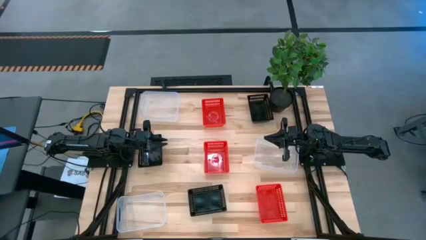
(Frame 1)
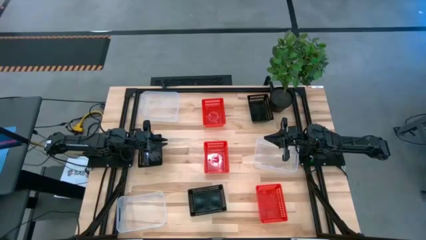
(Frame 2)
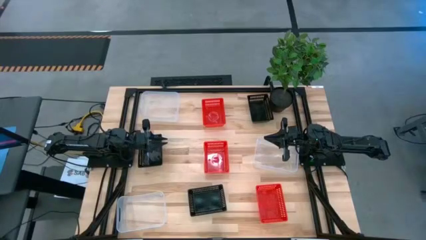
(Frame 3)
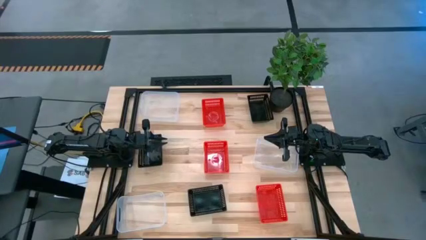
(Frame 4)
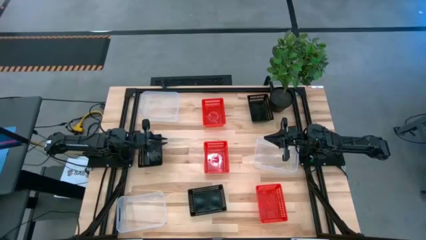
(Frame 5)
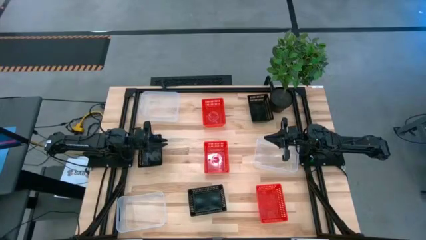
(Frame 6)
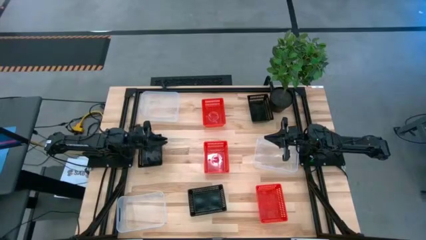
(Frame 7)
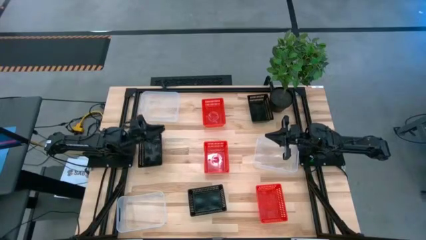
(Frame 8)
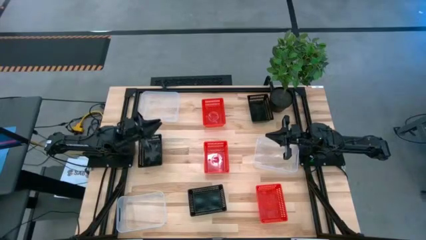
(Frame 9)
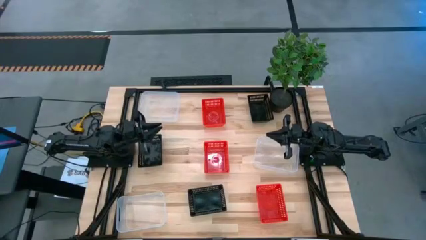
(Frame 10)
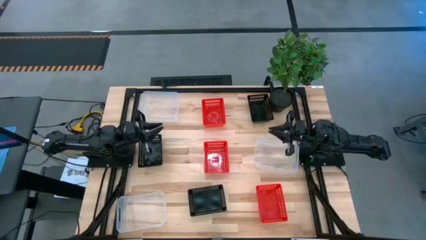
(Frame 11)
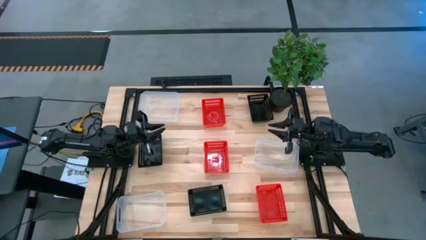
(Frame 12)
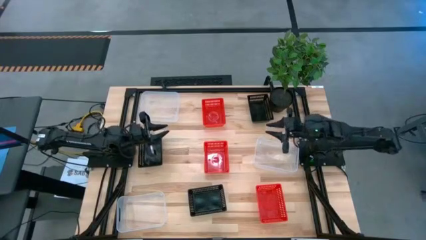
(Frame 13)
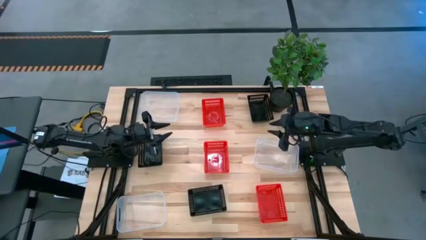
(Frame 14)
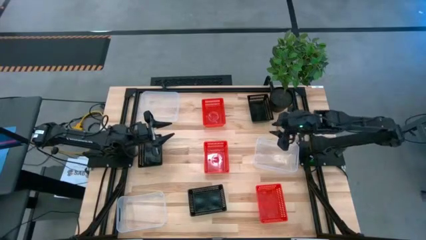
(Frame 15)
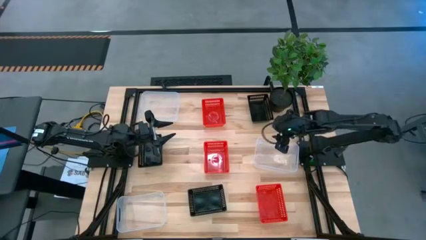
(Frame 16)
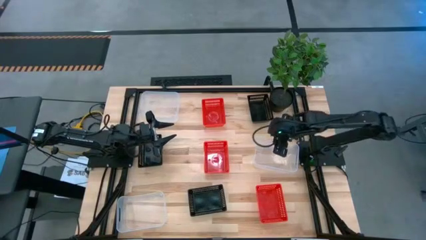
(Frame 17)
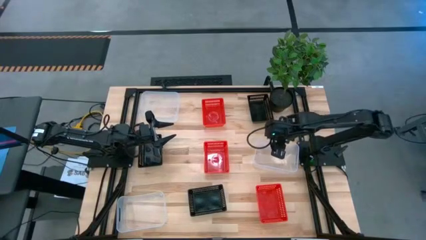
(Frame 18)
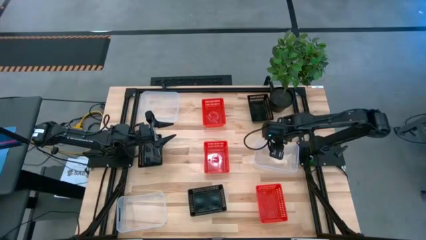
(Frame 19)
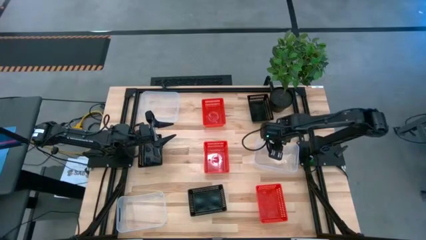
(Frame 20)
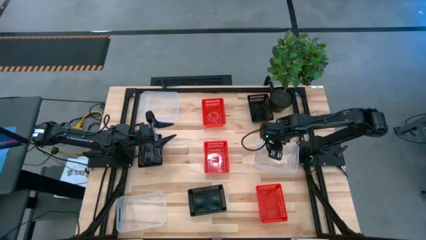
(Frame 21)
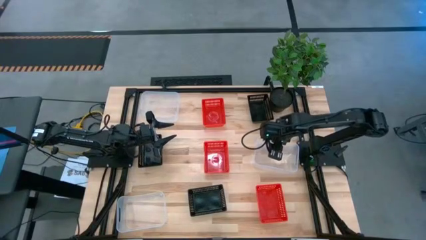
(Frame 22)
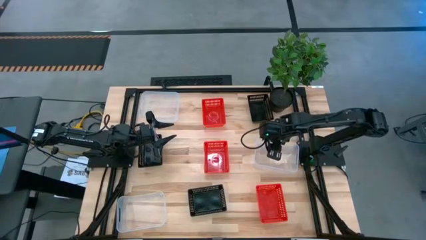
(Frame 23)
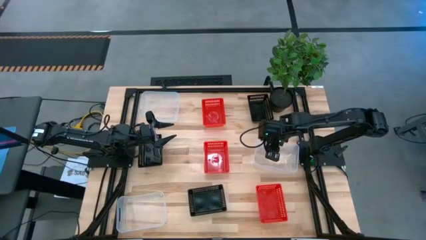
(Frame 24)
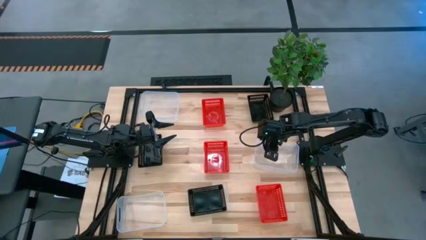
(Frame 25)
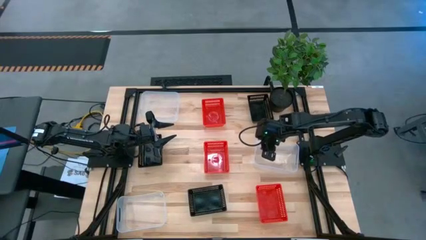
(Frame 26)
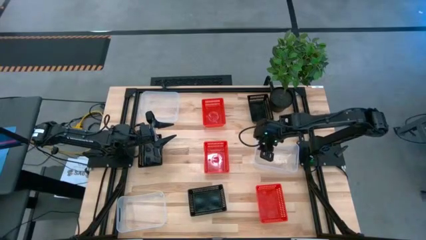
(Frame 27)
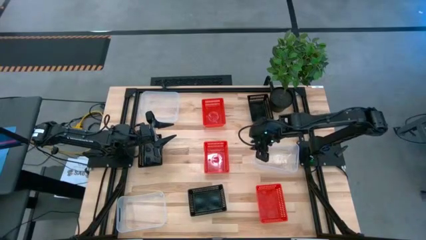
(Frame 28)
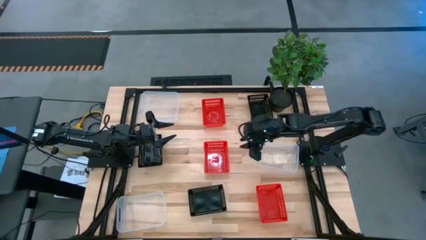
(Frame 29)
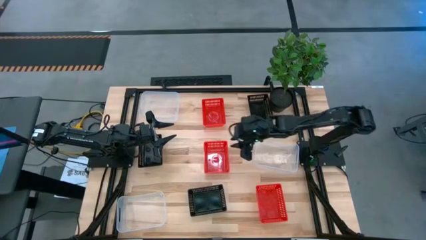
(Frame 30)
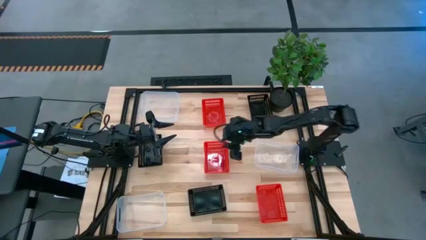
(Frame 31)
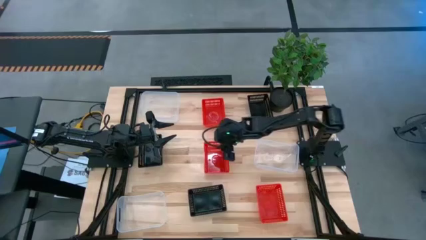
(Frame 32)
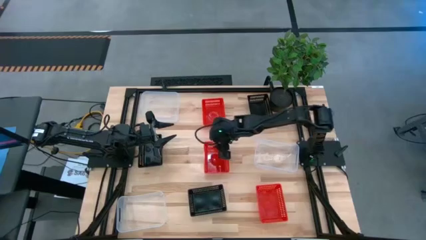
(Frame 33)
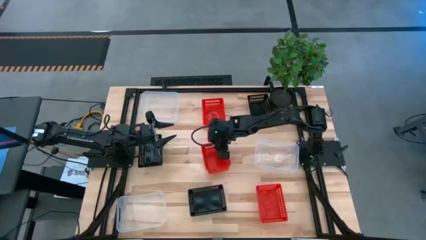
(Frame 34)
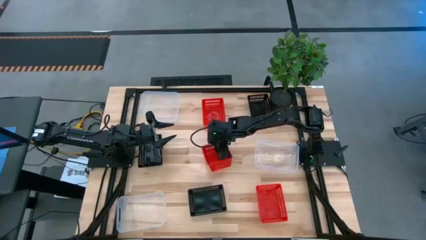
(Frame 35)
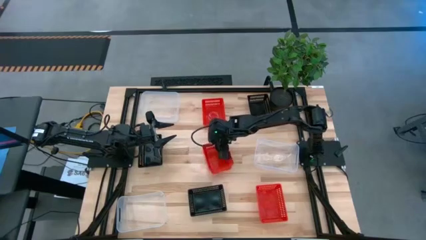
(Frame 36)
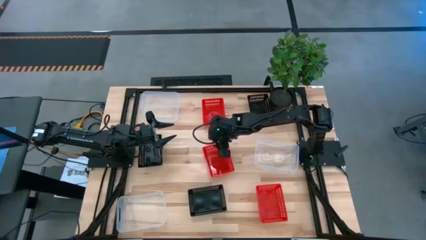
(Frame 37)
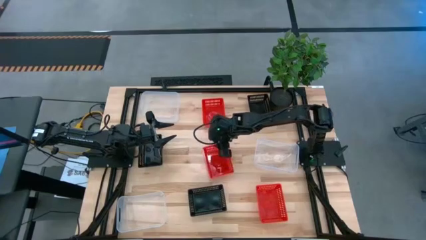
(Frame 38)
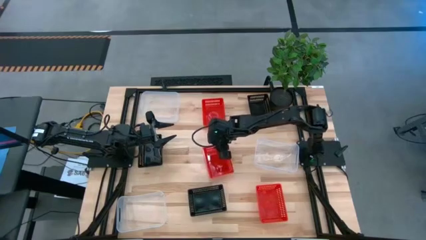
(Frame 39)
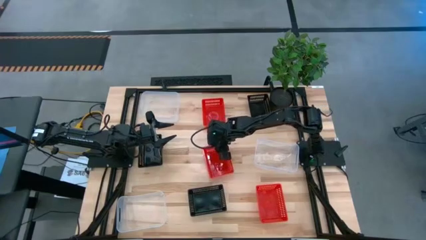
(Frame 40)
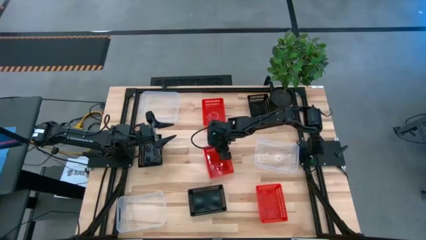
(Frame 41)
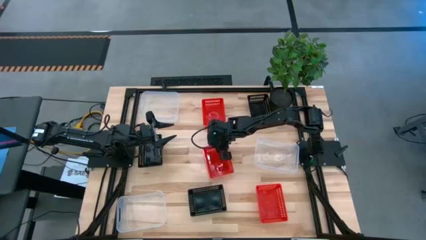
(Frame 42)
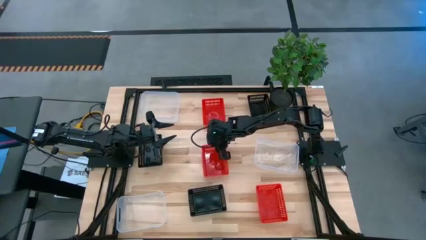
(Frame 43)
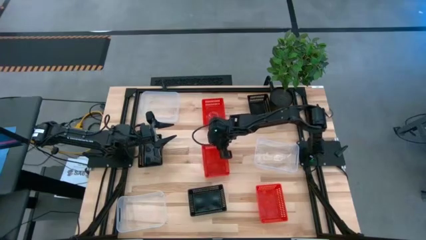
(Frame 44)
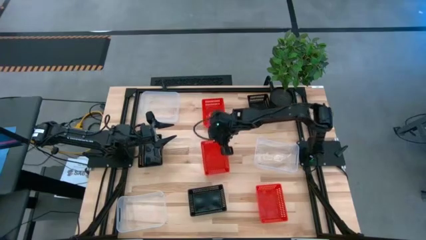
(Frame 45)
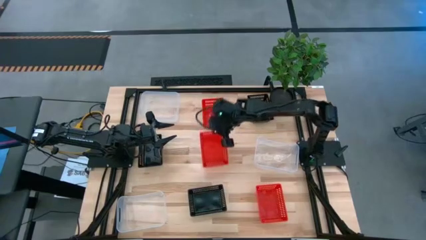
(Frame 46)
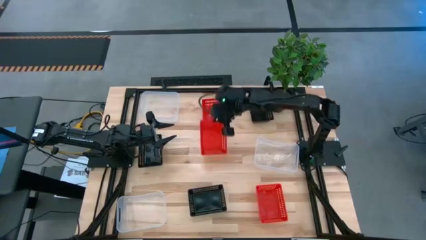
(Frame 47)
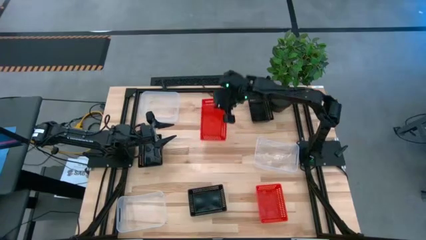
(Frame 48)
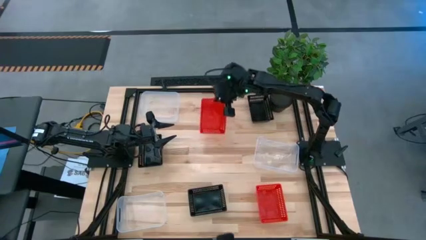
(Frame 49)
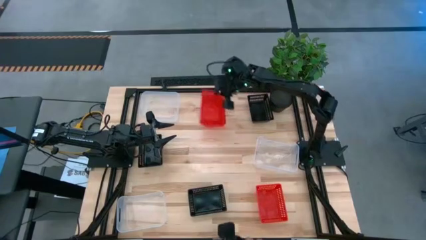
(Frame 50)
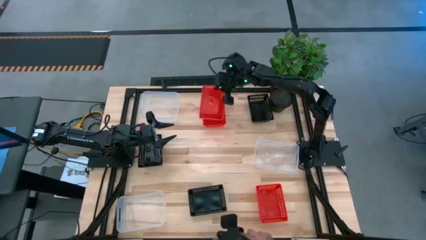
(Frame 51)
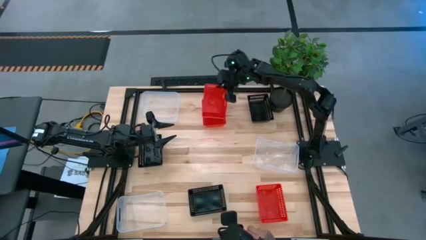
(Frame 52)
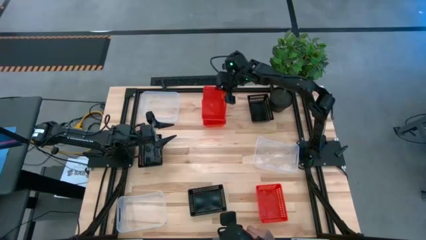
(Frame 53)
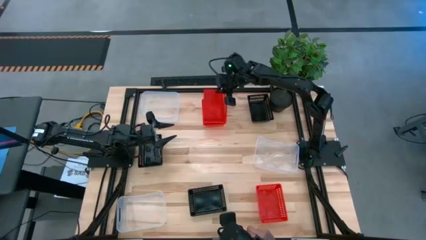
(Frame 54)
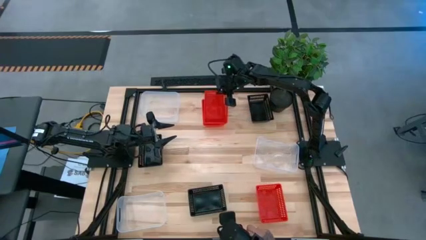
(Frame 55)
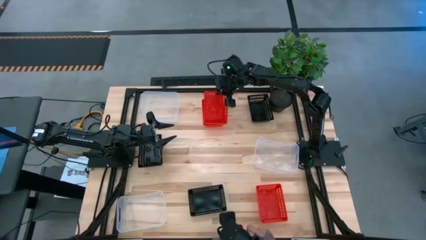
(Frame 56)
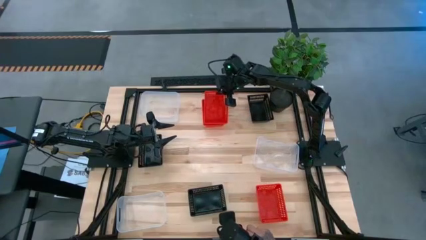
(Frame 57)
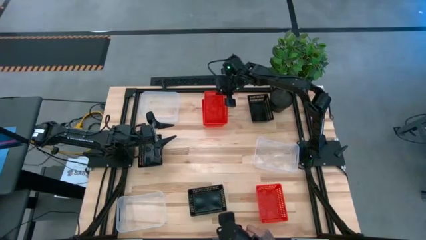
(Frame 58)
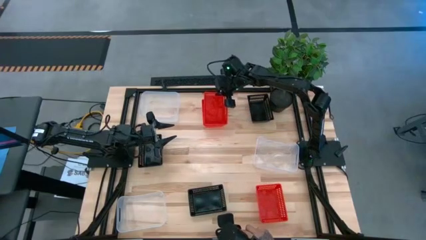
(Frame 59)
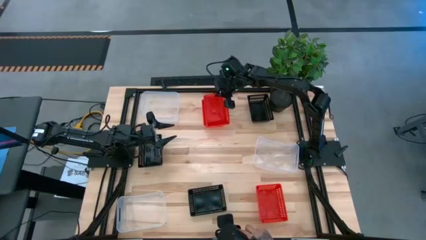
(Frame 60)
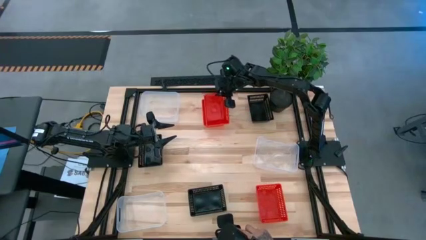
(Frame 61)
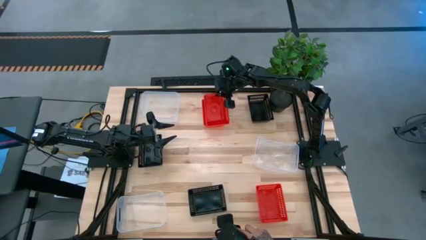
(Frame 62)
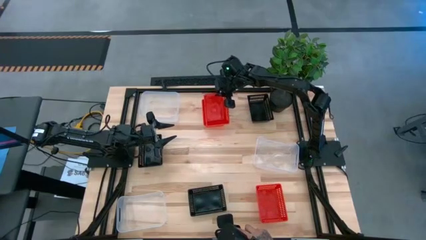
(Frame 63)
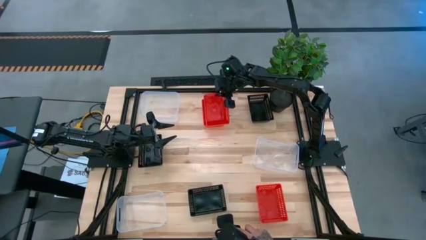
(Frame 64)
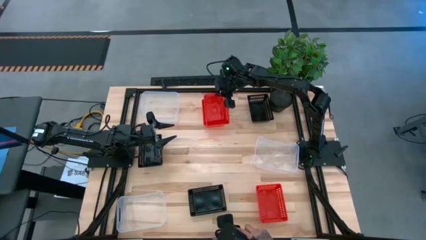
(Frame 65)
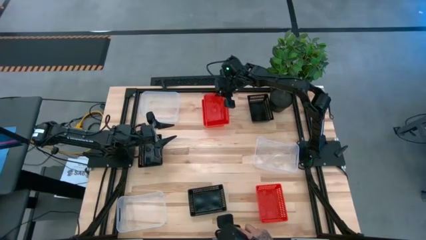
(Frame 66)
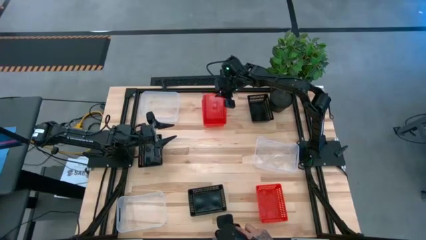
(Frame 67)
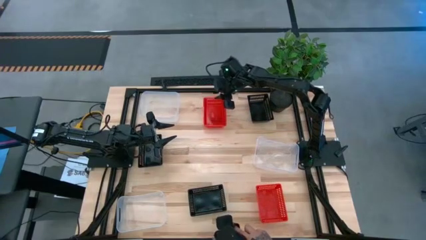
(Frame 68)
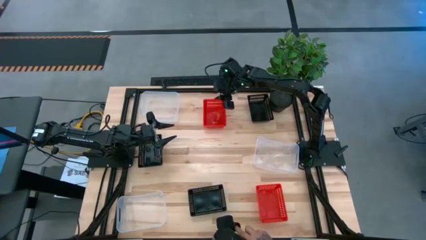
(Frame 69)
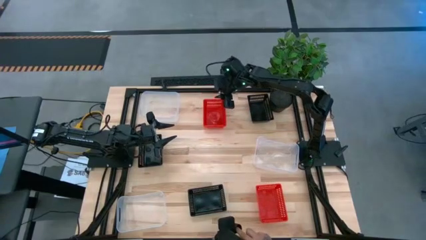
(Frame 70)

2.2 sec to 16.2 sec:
Stack the middle red basket on the top red basket
